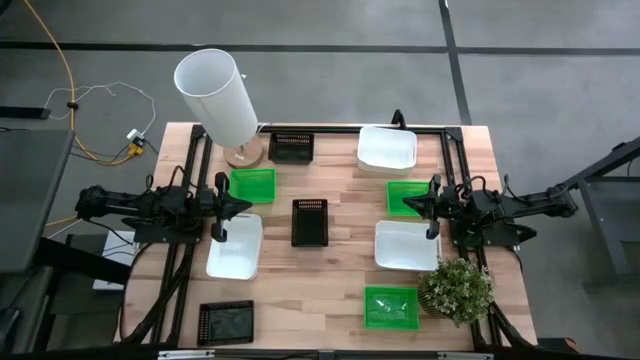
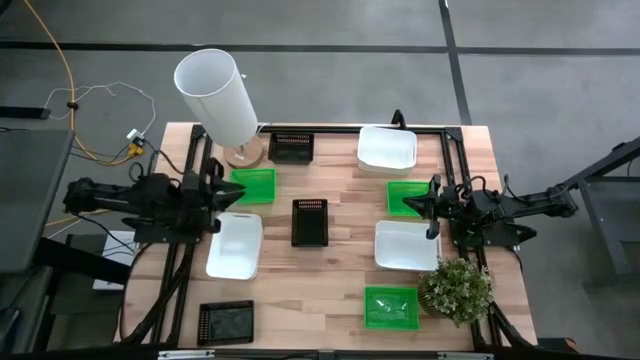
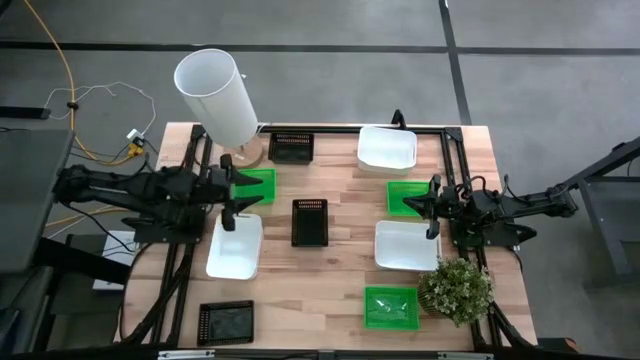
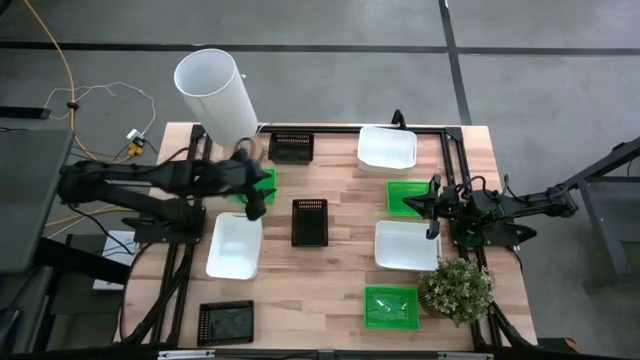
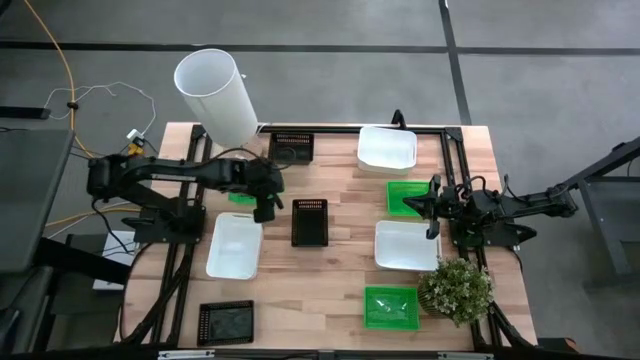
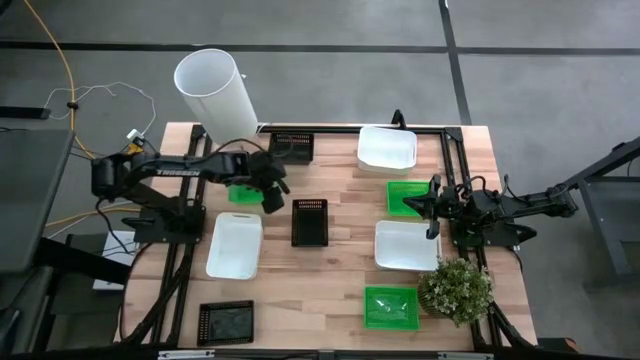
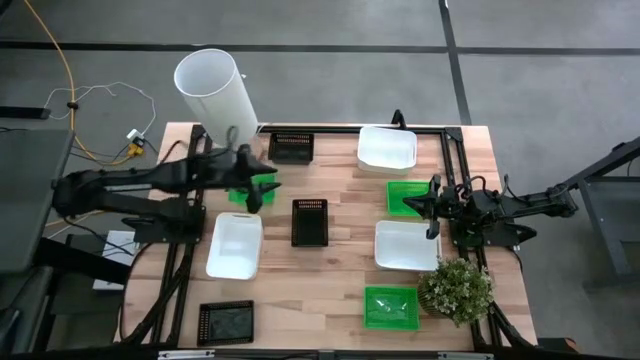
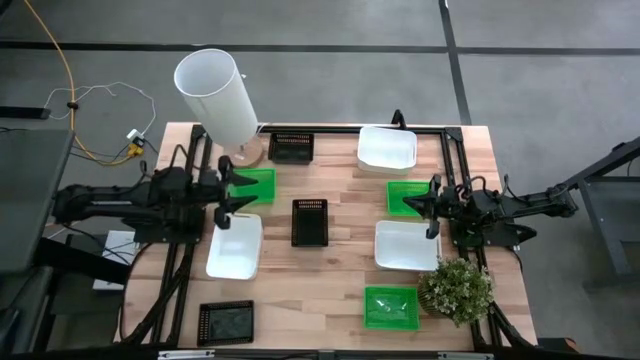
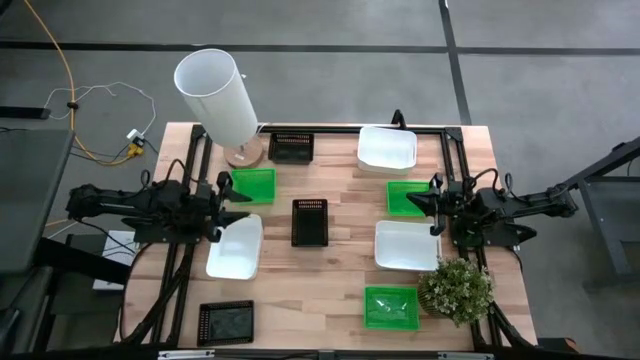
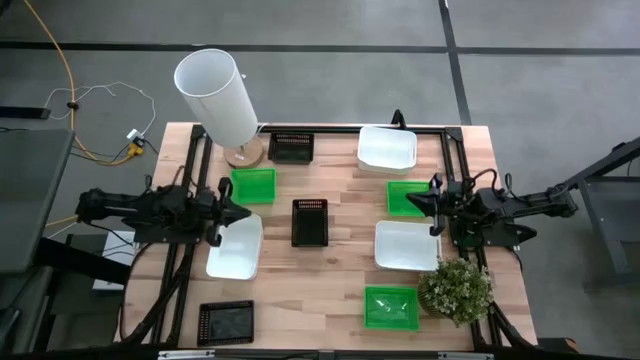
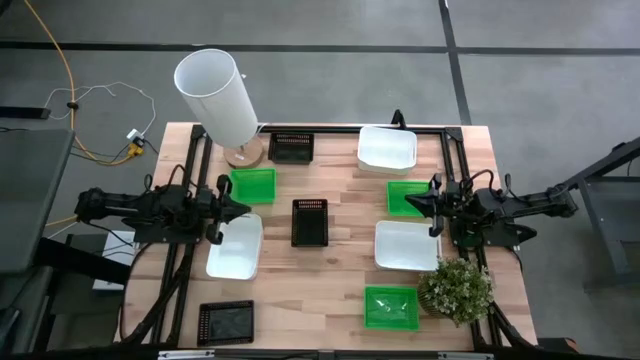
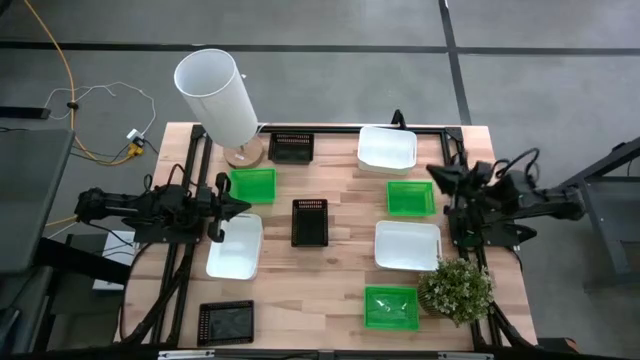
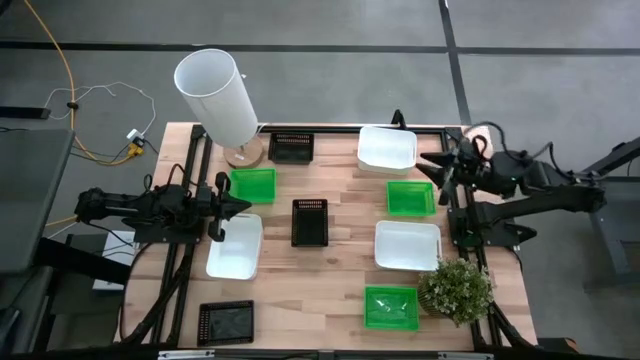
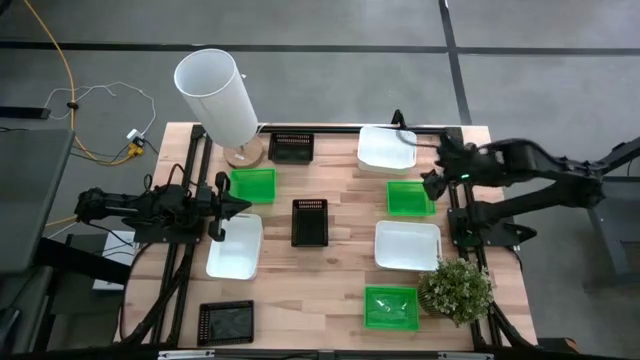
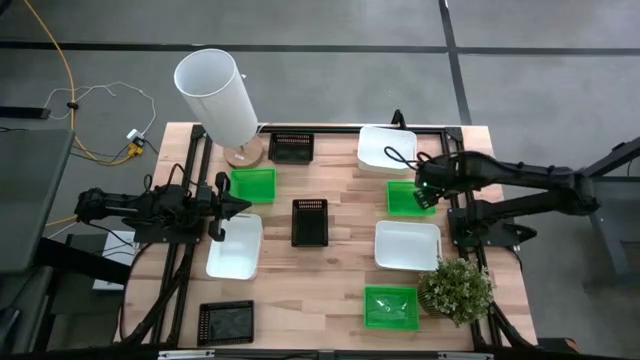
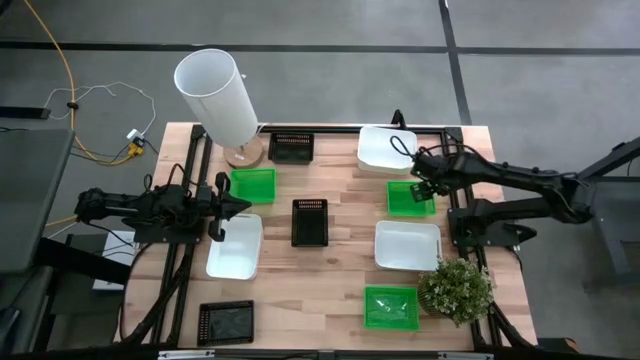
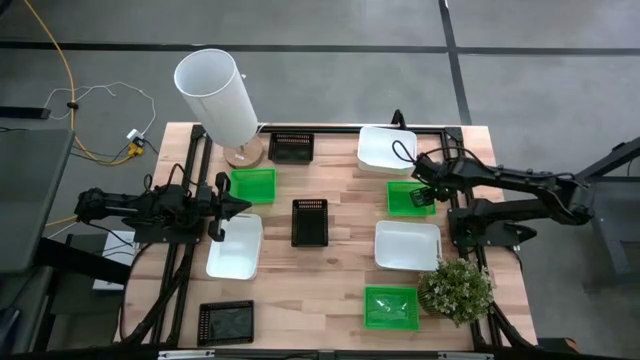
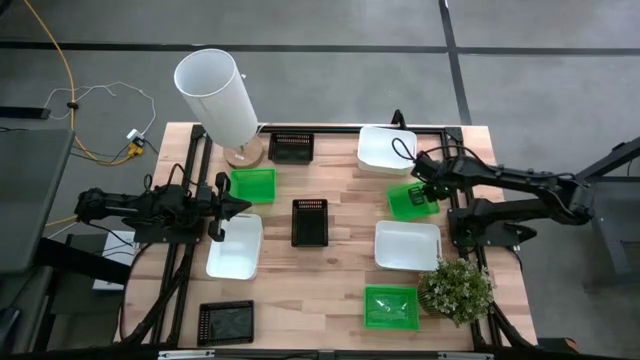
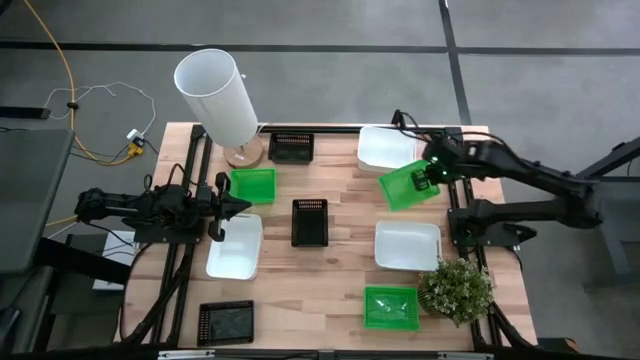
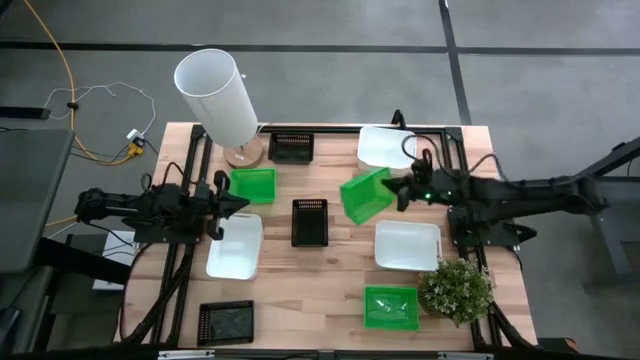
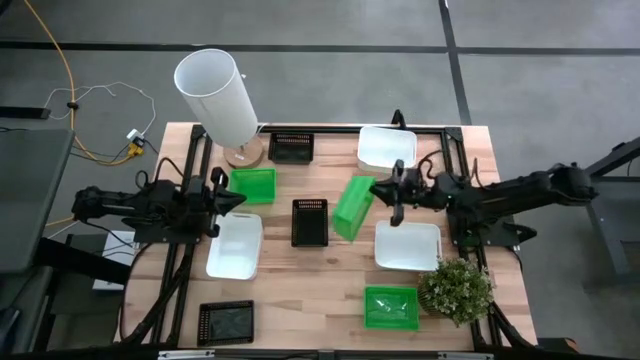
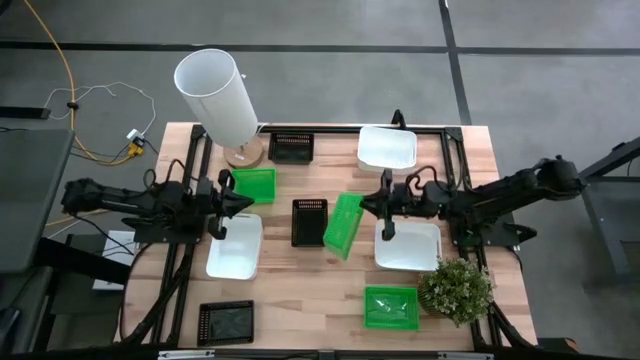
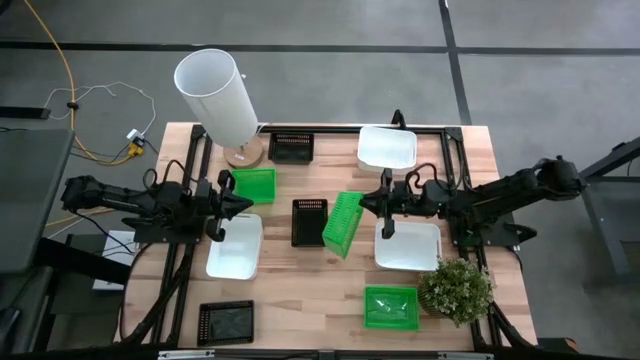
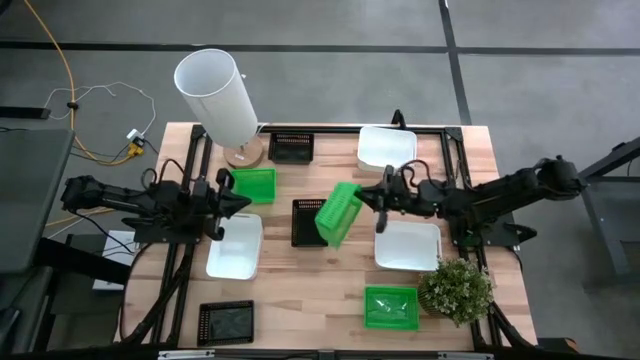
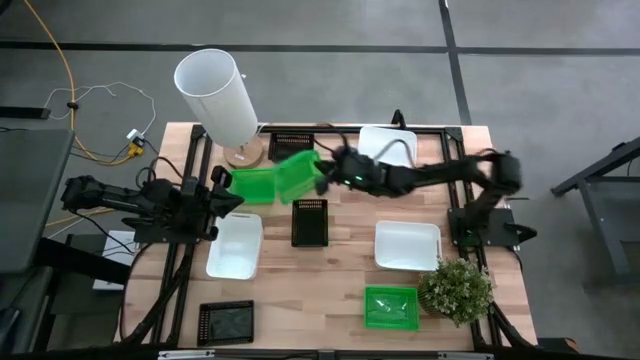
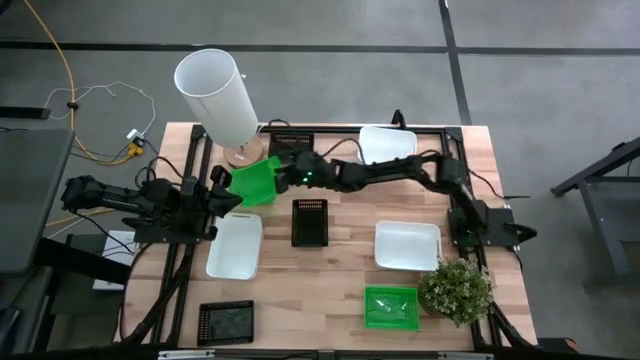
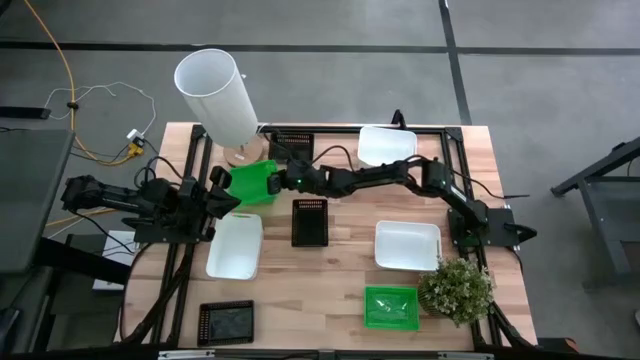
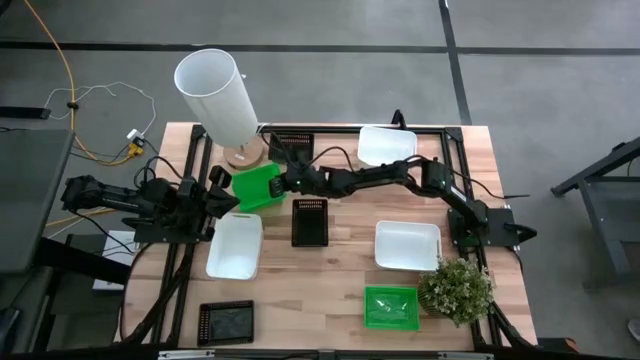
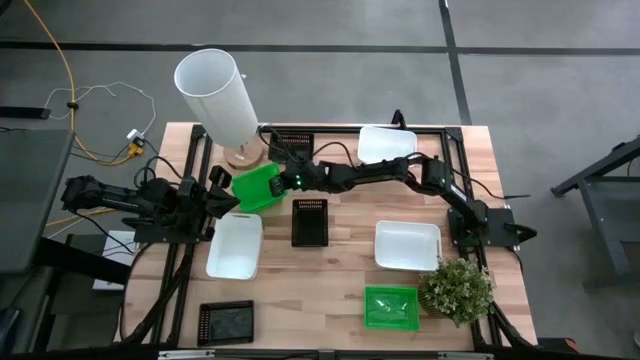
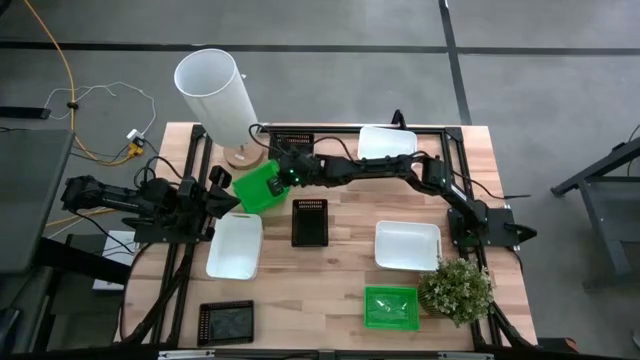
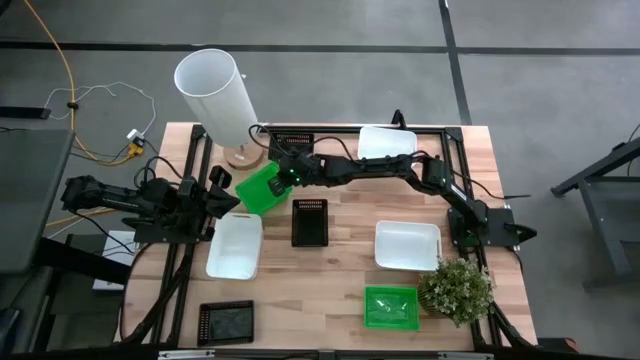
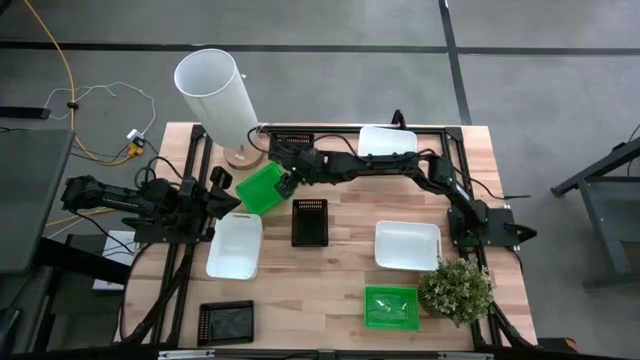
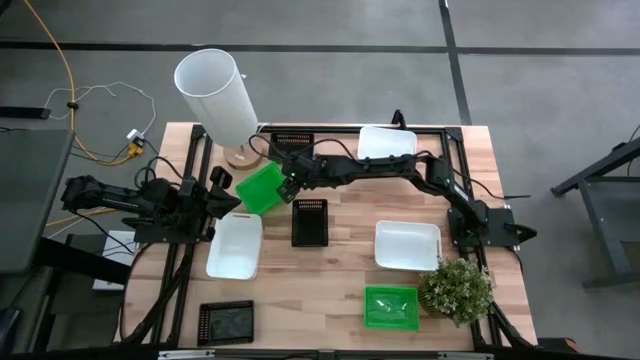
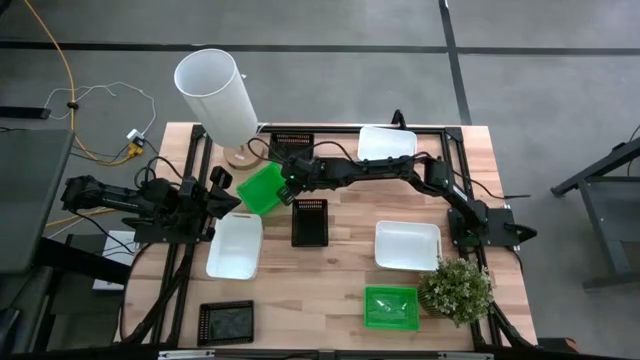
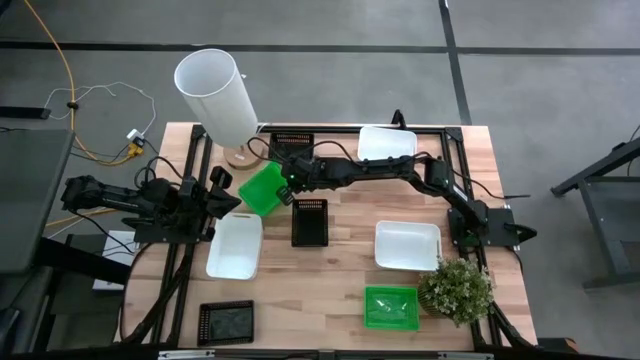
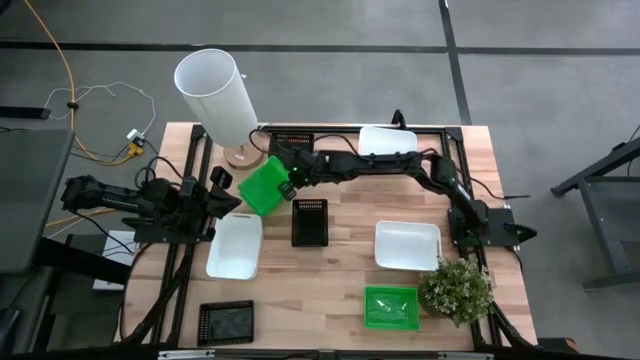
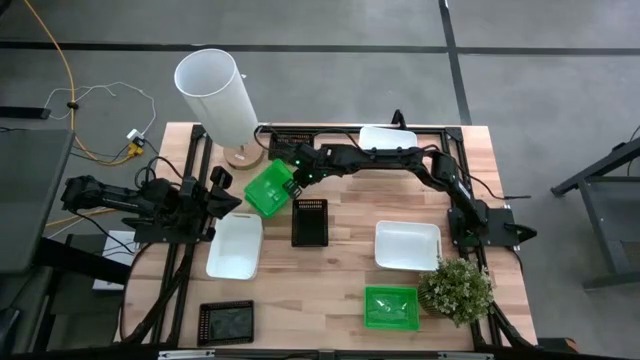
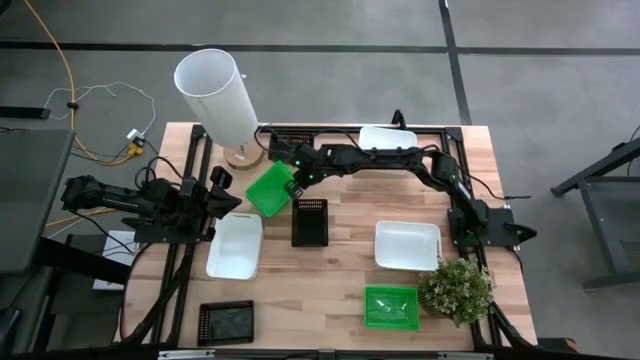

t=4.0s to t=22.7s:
Stack the right green bin on the left green bin
